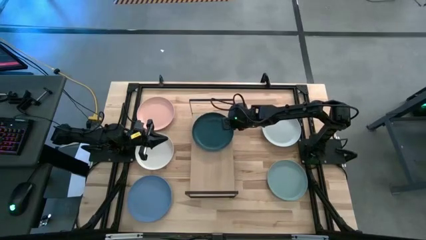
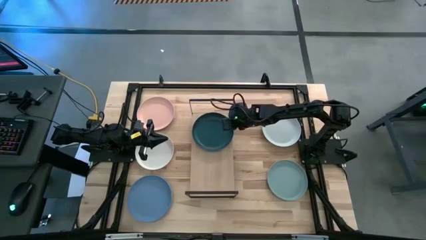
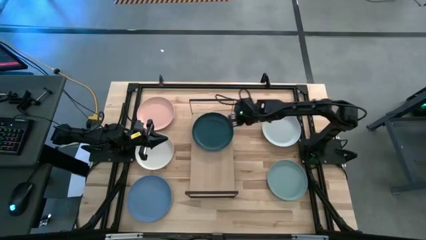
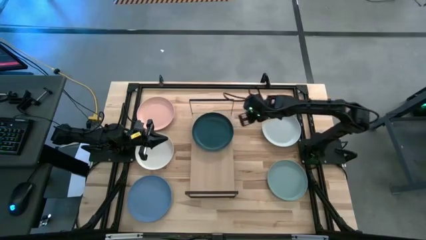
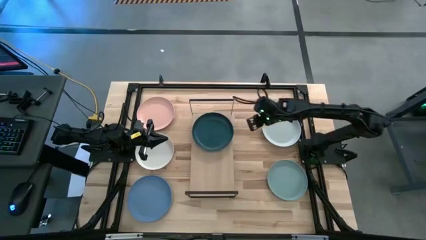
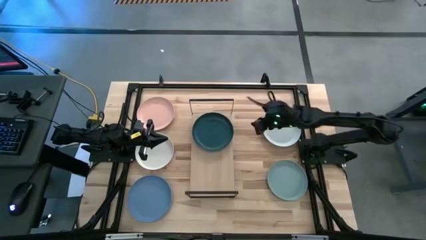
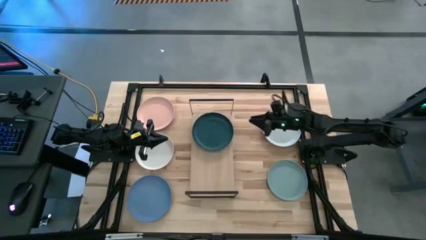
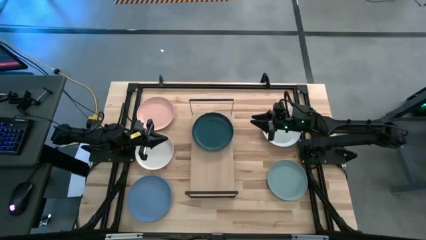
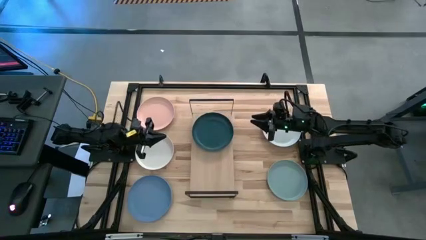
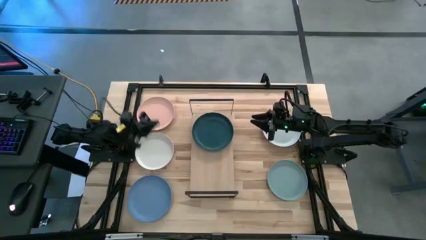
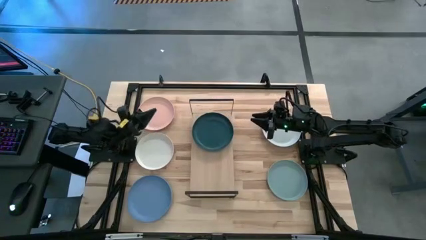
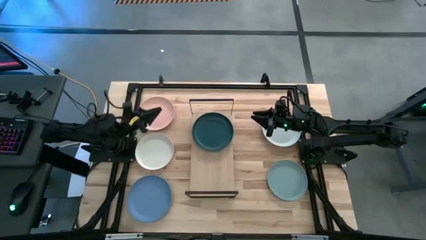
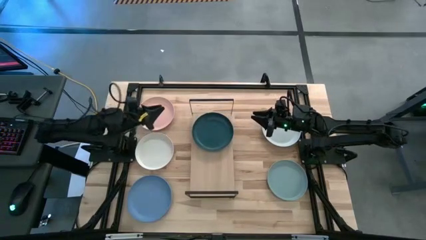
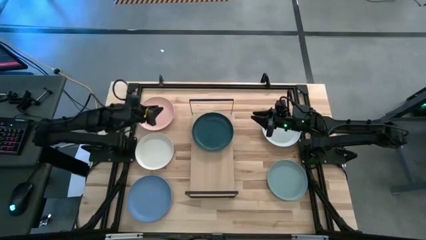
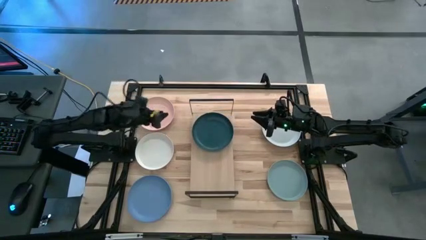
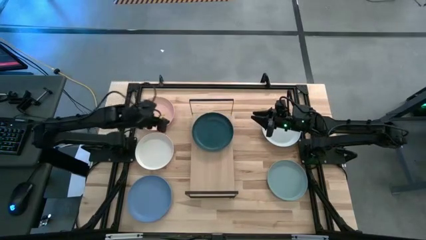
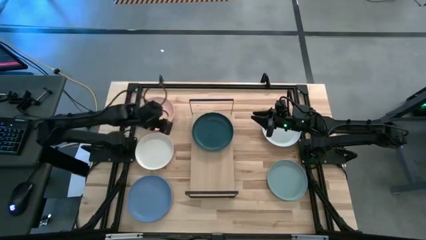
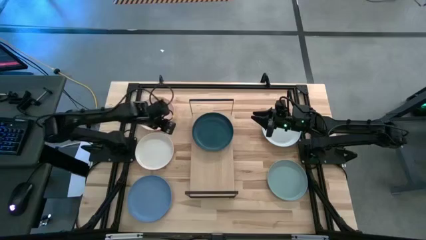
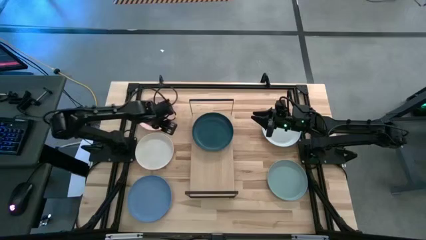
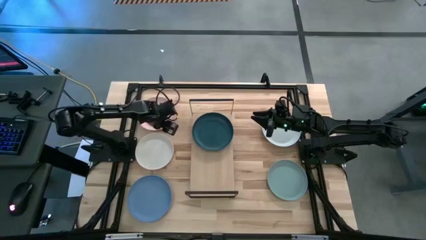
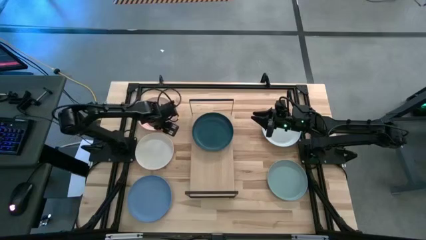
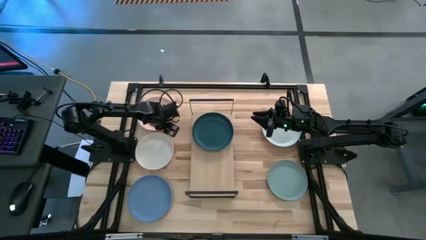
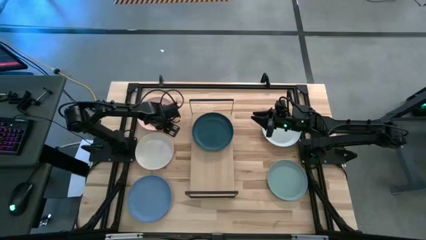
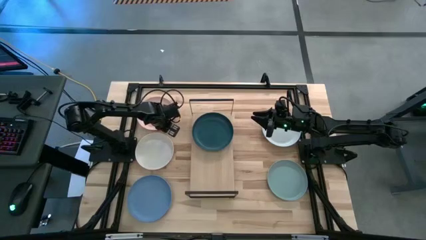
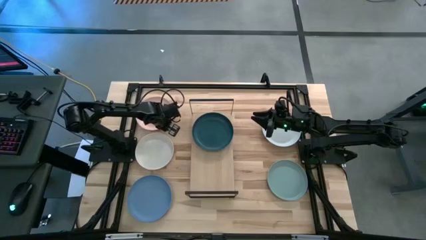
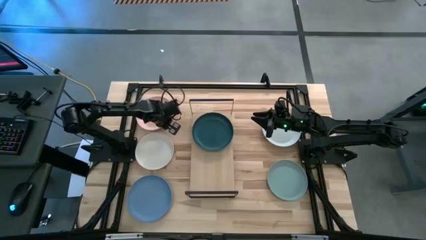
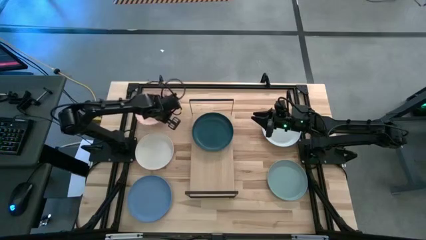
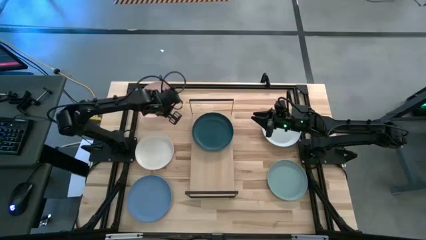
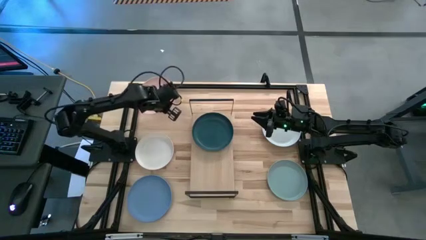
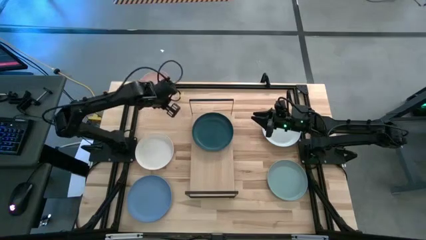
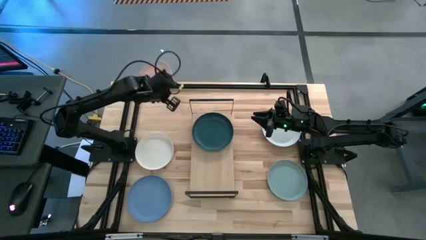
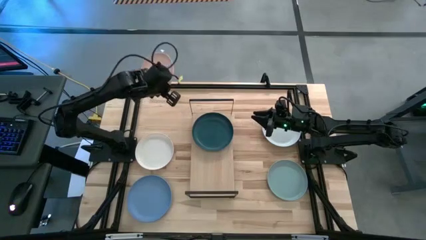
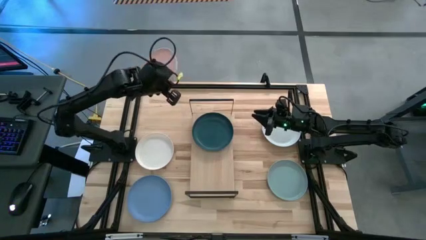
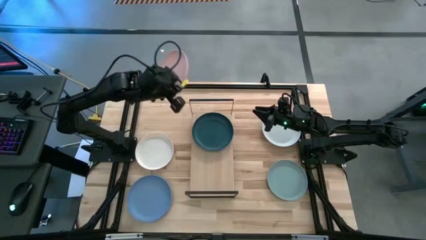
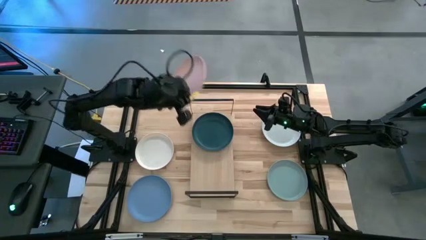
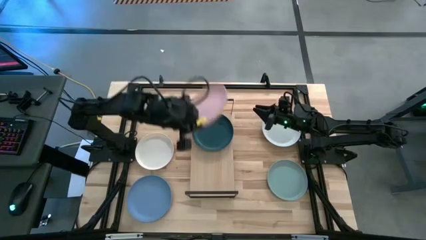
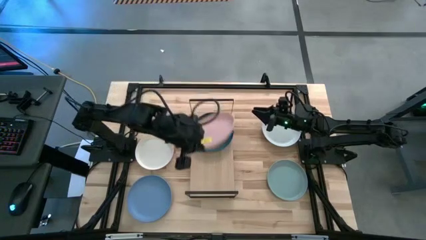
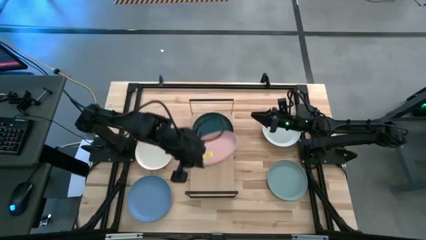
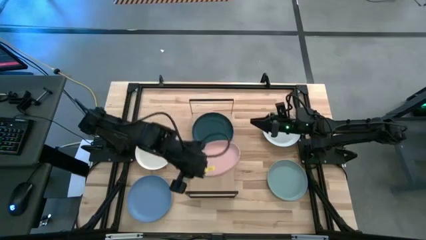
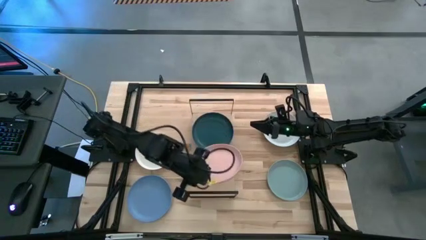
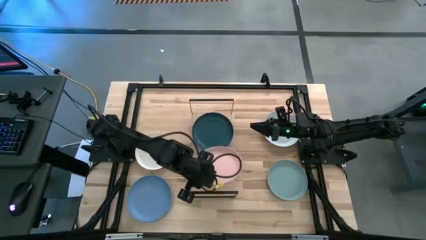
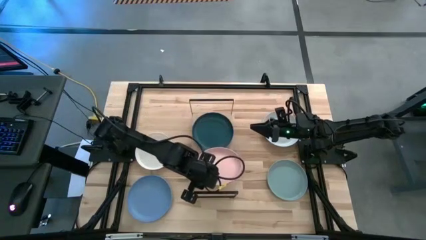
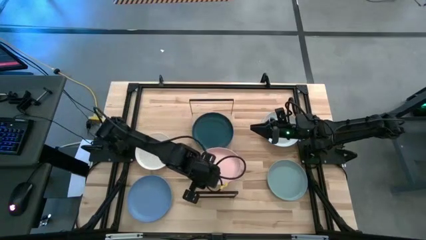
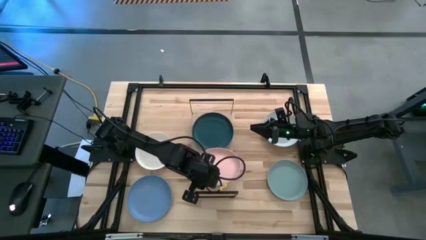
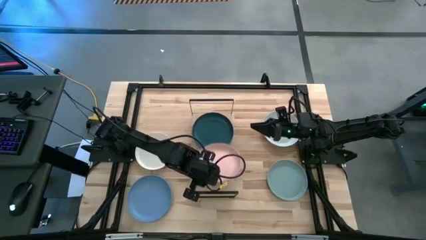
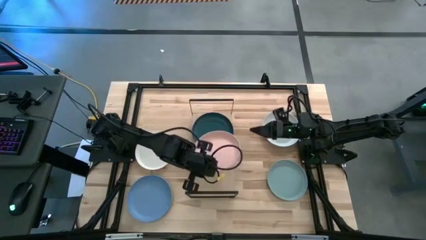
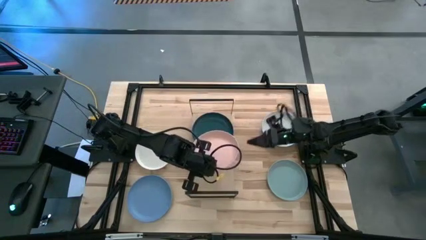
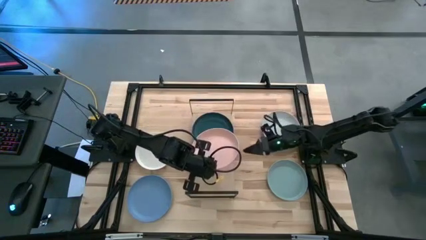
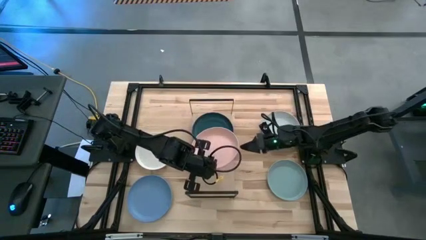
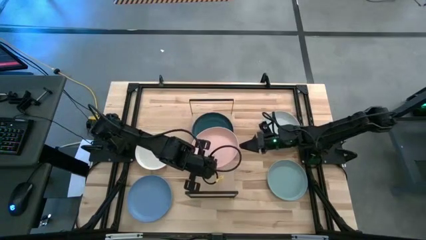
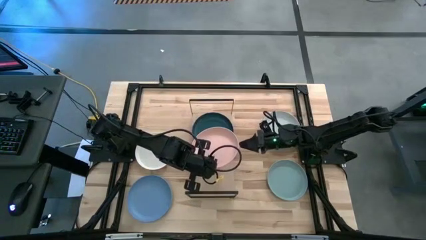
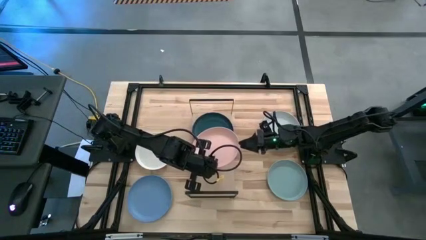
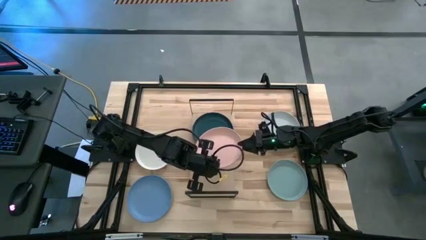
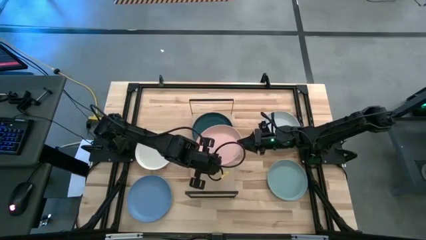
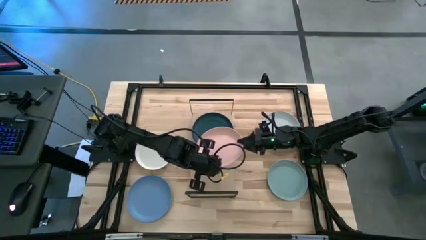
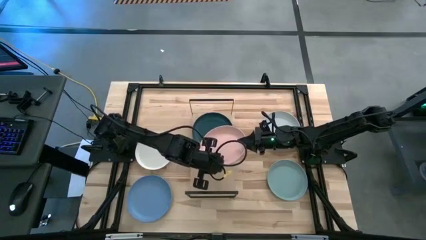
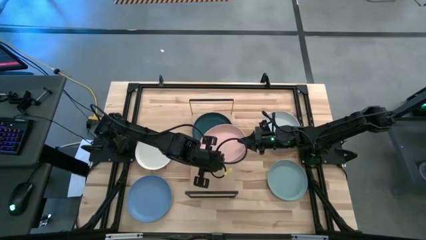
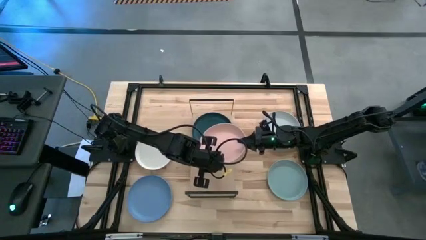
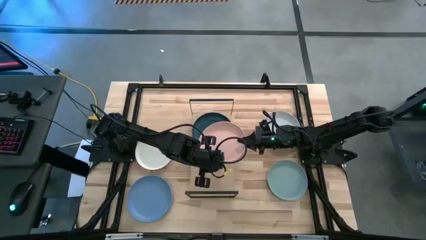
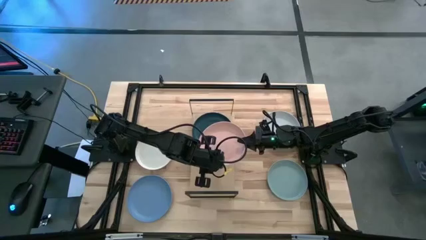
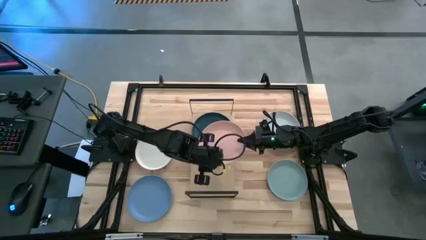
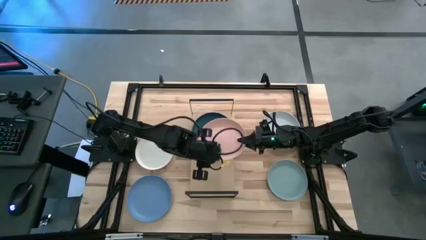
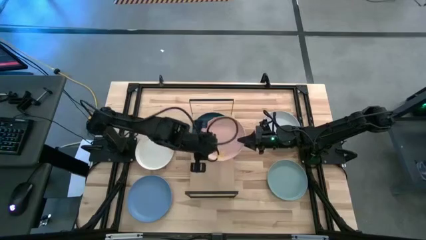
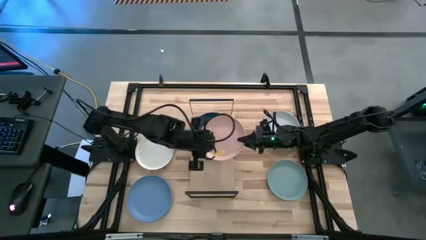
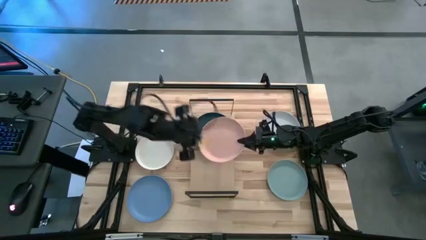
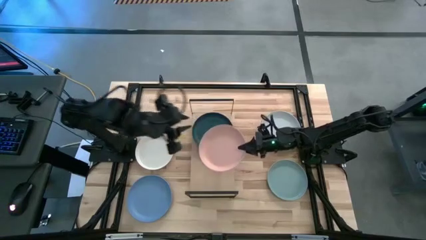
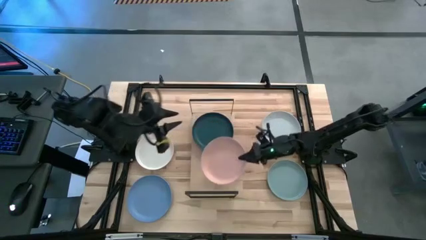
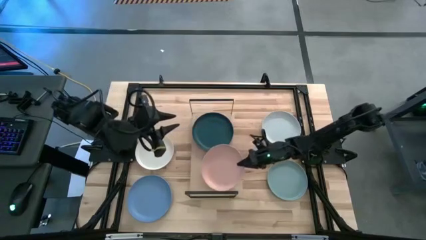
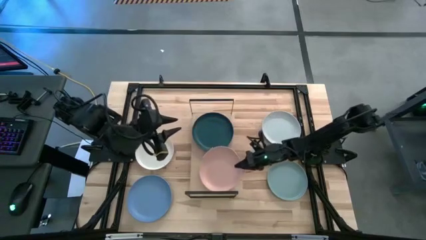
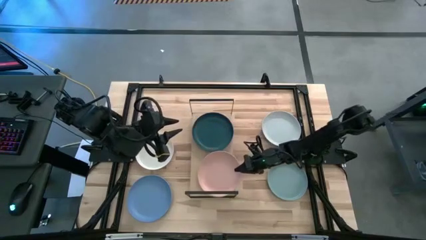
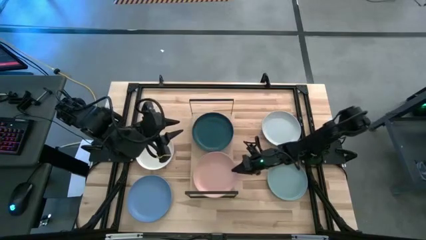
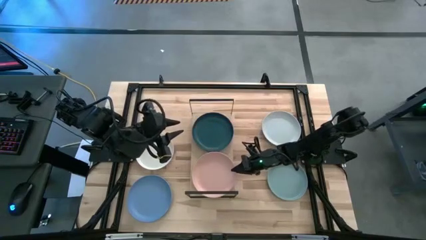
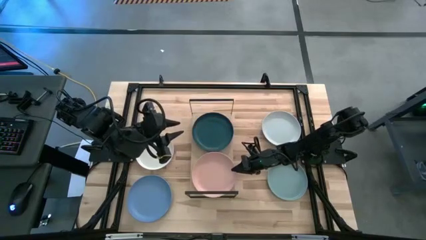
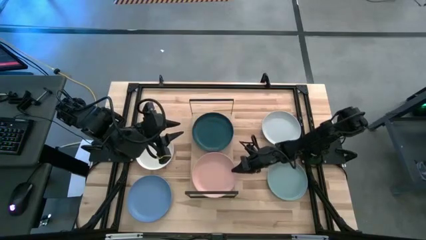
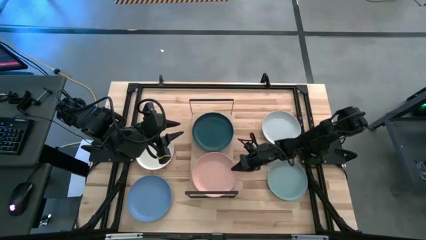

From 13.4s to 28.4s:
Task: Place and stack plates onto a shelf
Put the pink plate on the shelf
